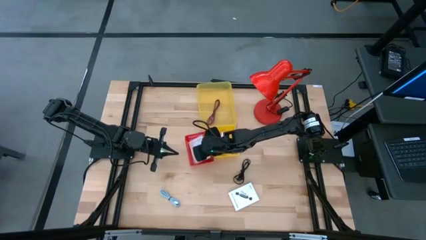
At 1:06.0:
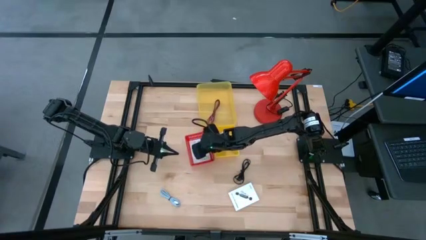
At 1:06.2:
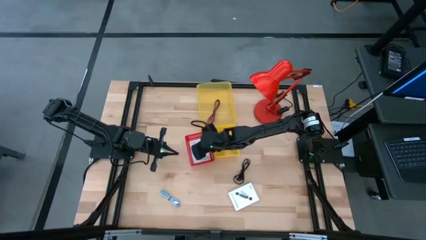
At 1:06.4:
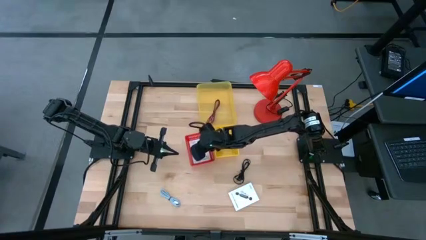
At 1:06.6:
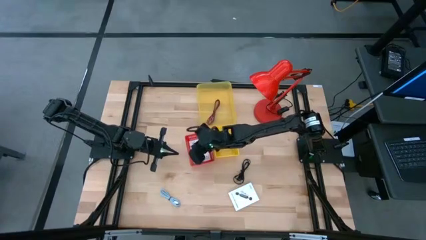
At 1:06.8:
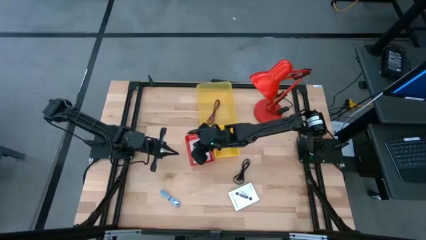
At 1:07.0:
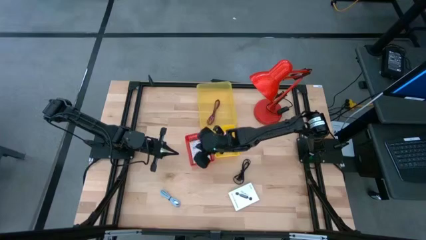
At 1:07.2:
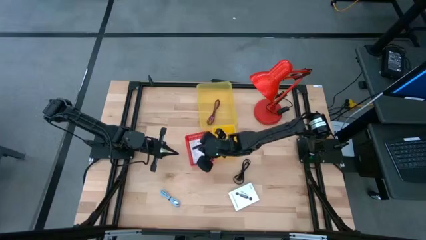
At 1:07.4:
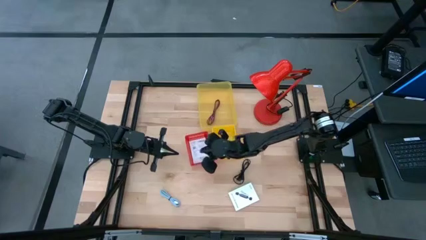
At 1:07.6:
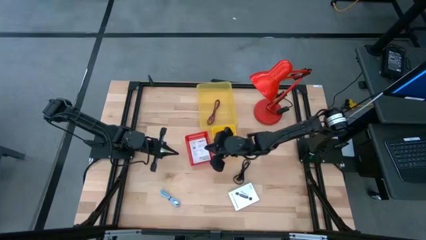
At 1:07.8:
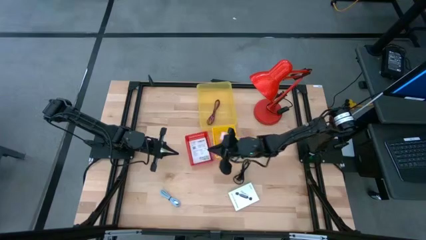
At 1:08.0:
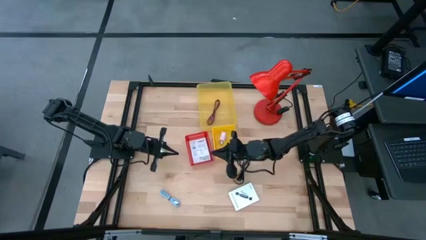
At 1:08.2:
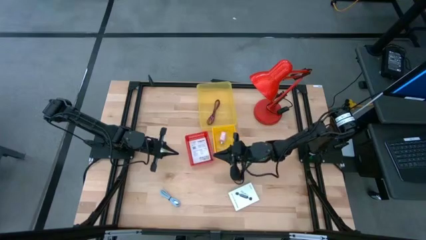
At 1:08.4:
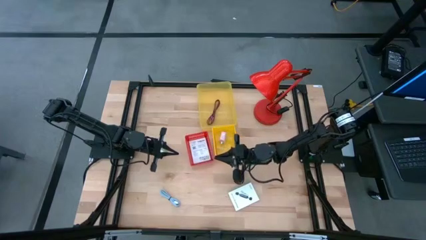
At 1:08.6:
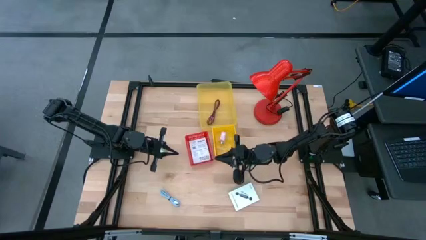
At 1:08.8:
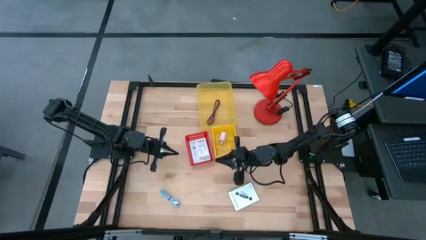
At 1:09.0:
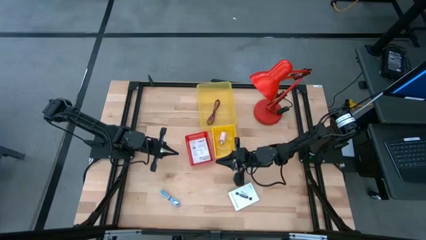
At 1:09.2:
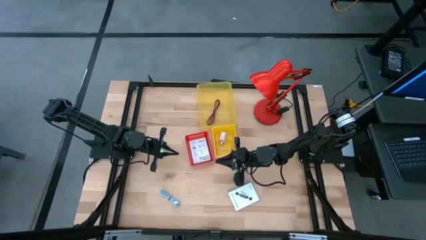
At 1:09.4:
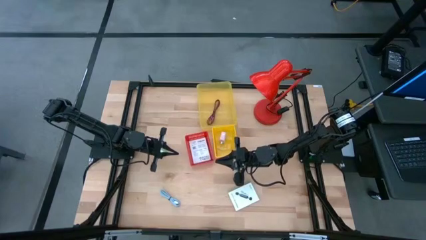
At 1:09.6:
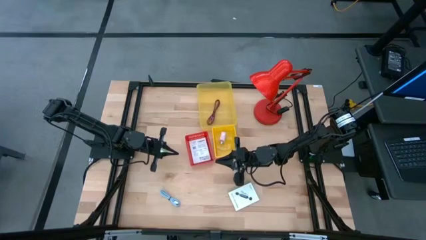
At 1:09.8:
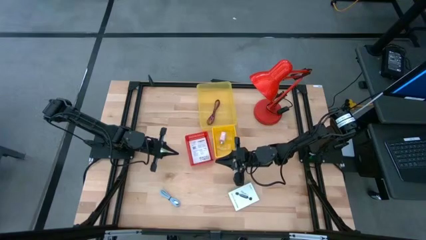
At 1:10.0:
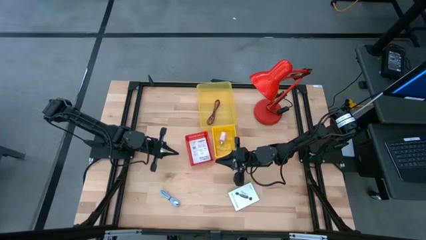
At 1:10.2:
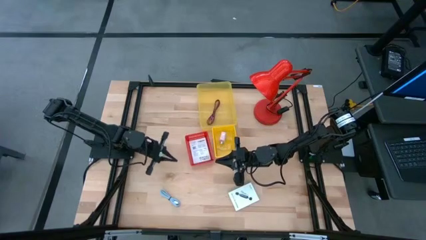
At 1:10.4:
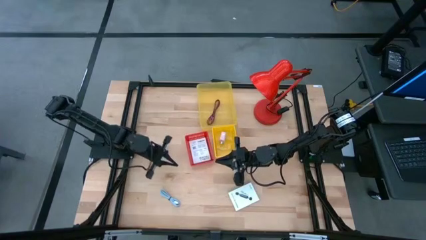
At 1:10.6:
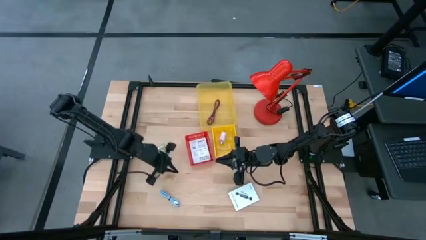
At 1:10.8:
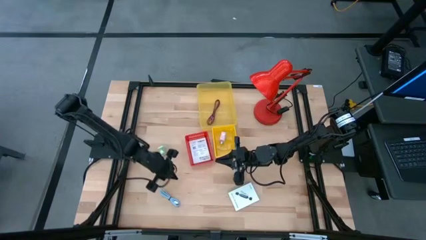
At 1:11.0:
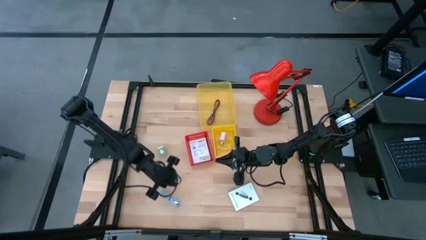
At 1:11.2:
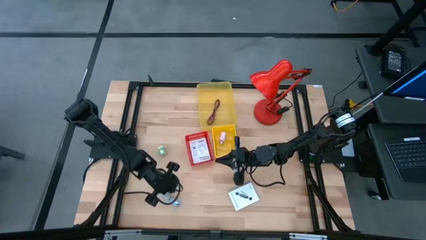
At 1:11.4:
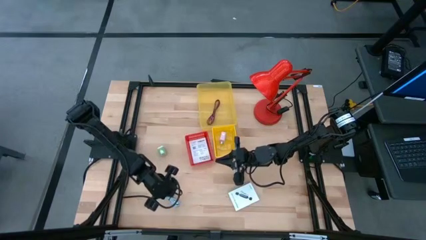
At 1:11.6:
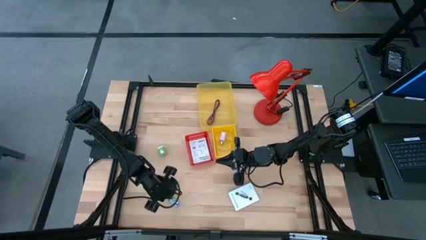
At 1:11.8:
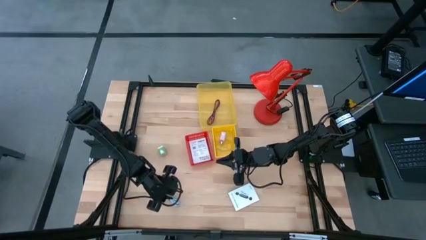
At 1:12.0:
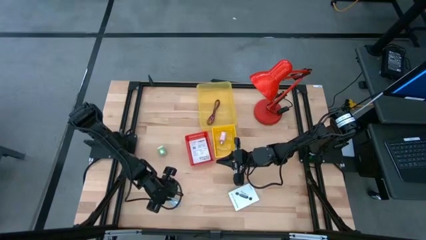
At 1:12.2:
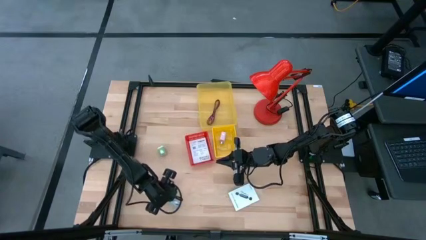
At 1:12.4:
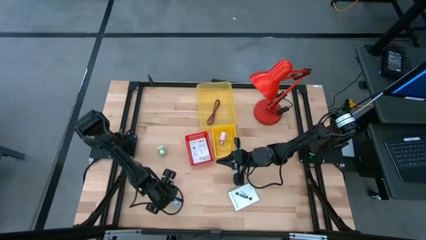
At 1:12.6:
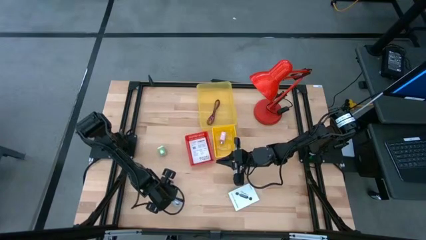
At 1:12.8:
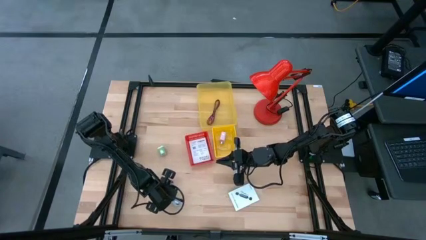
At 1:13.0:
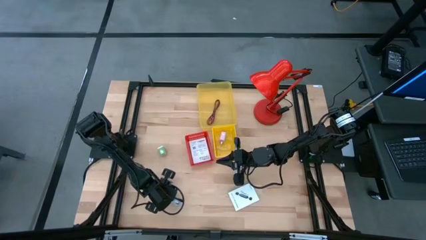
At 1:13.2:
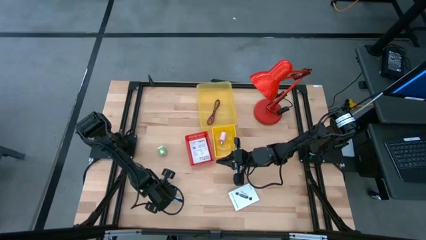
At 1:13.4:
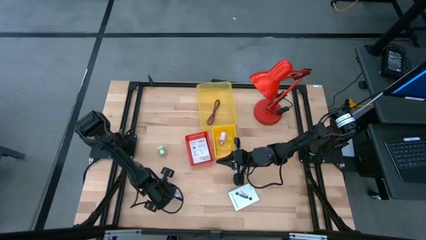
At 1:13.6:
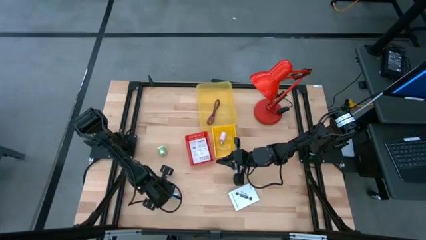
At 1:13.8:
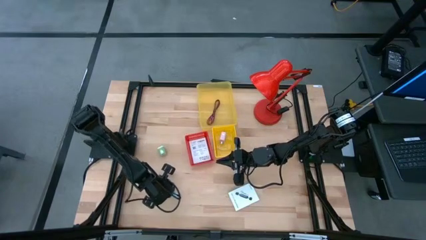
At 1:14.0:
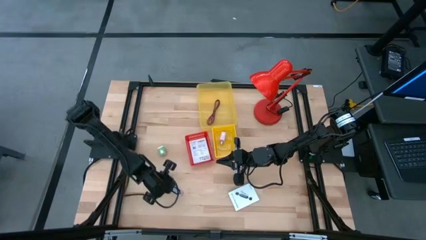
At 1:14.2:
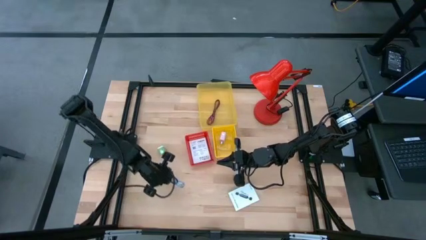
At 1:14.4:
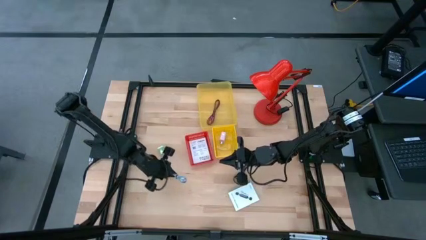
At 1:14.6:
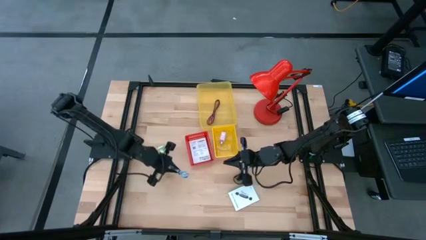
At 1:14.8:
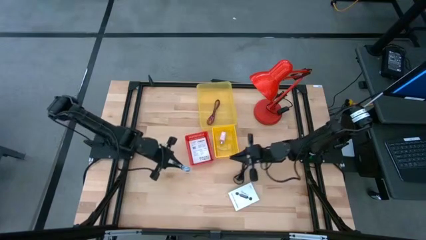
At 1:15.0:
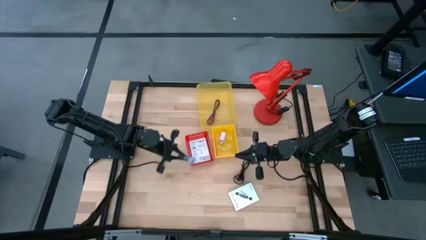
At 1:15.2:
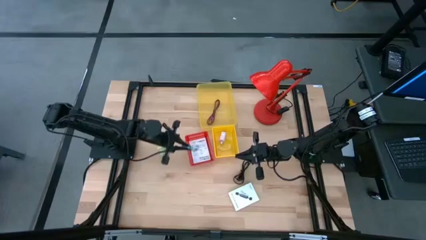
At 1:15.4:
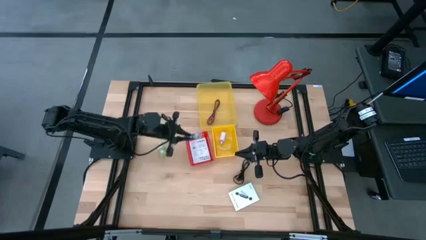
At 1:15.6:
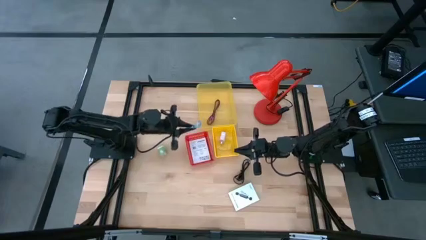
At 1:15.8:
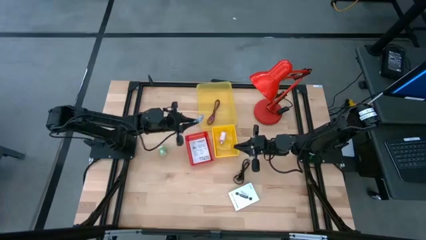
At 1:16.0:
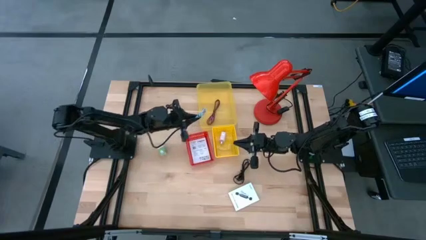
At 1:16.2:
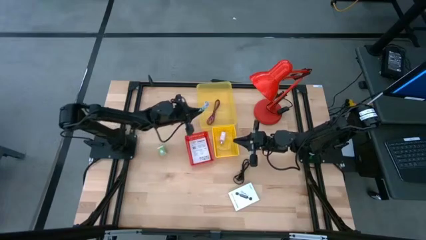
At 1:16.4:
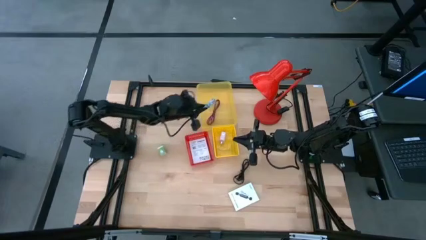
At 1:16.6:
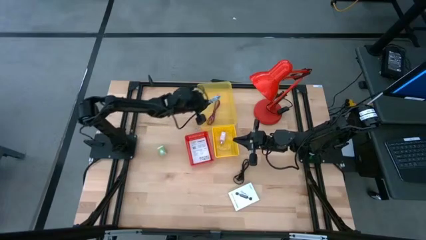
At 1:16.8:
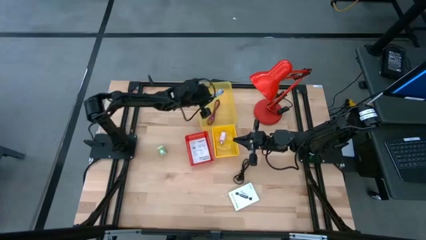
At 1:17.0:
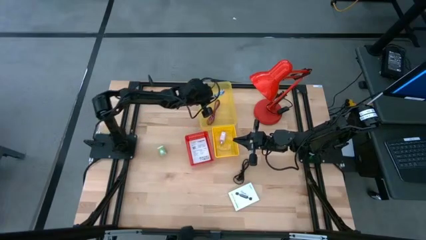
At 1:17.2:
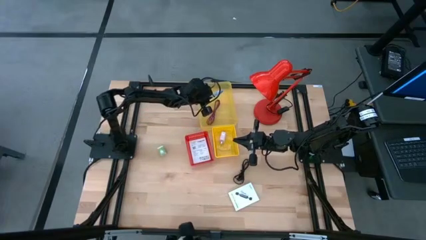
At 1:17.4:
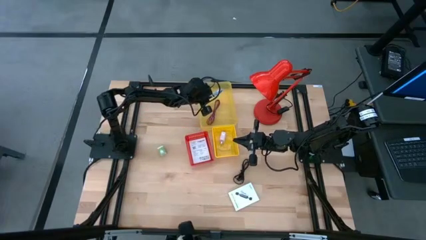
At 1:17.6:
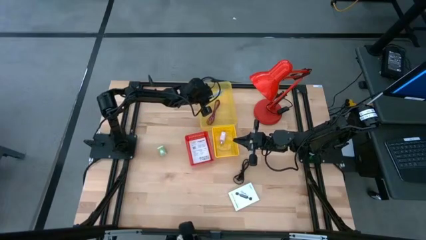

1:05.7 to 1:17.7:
Task: Pick and place items into bin
Put the blue cable wire into the top yellow bin
